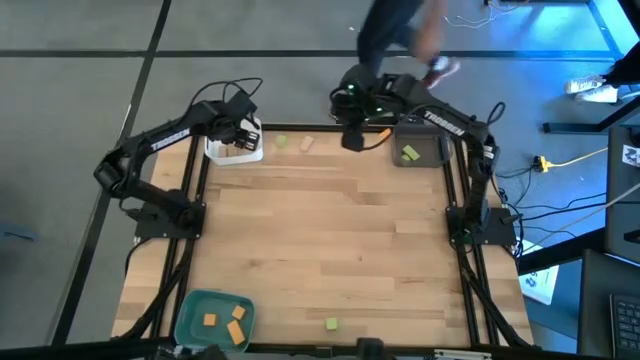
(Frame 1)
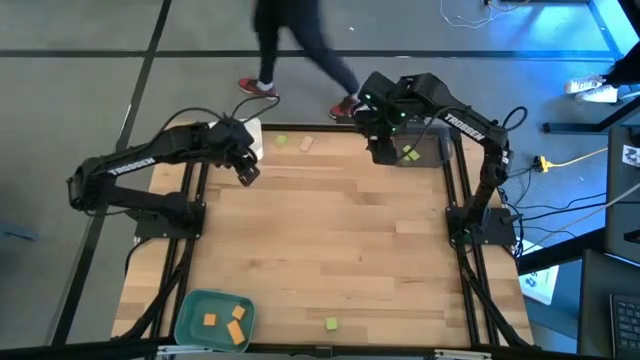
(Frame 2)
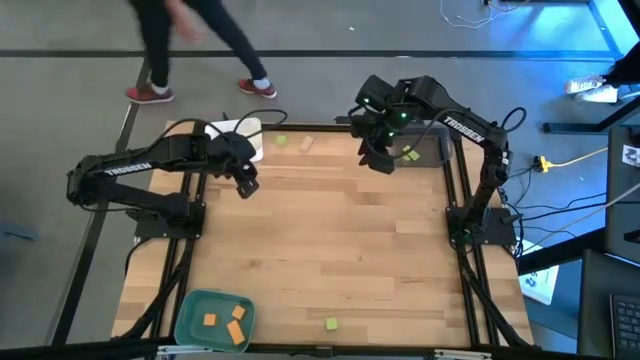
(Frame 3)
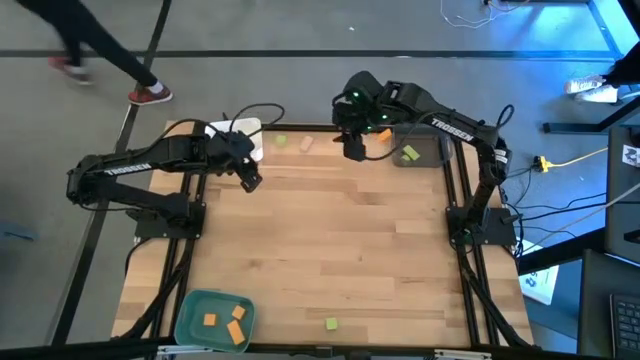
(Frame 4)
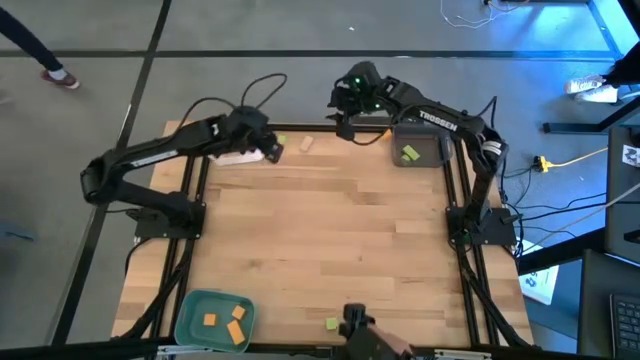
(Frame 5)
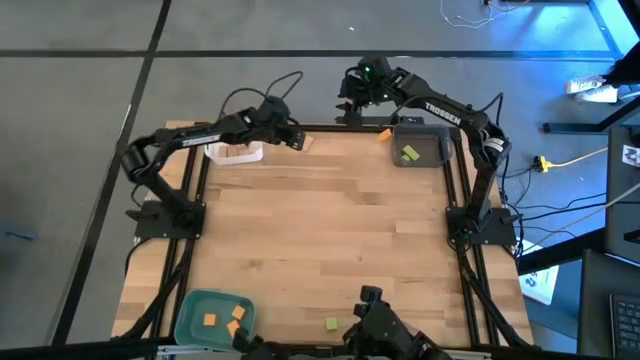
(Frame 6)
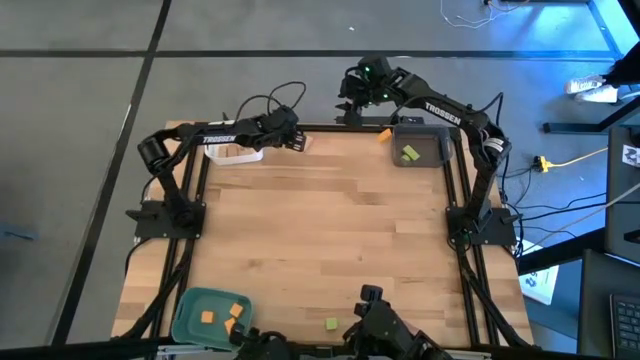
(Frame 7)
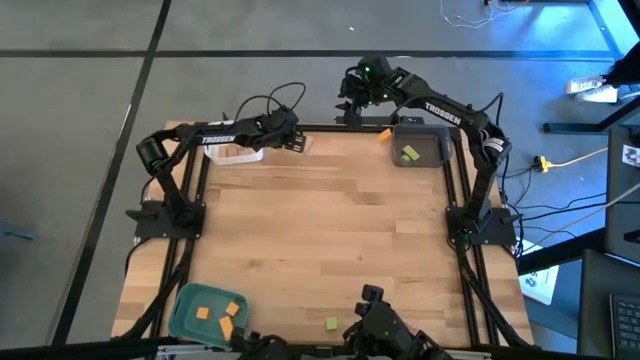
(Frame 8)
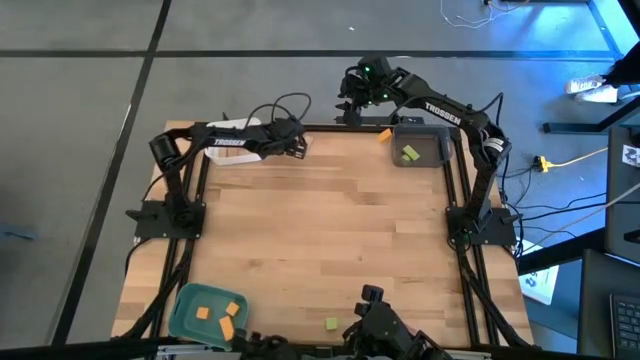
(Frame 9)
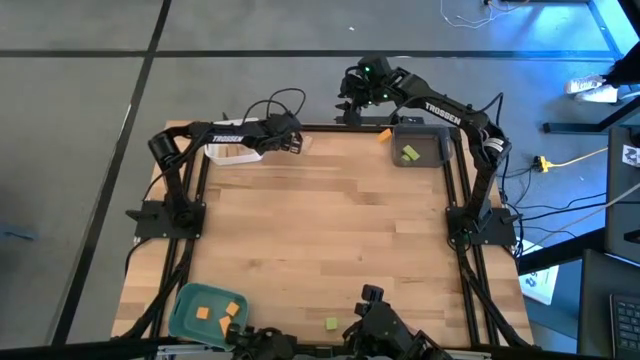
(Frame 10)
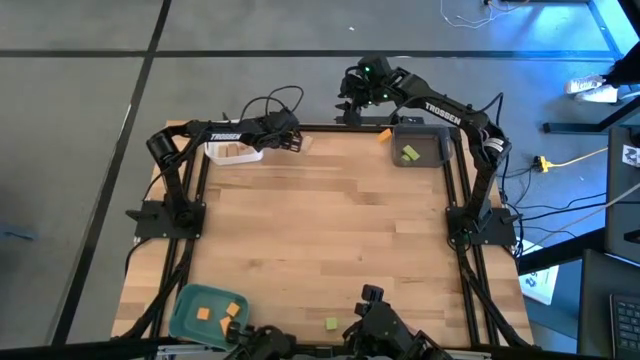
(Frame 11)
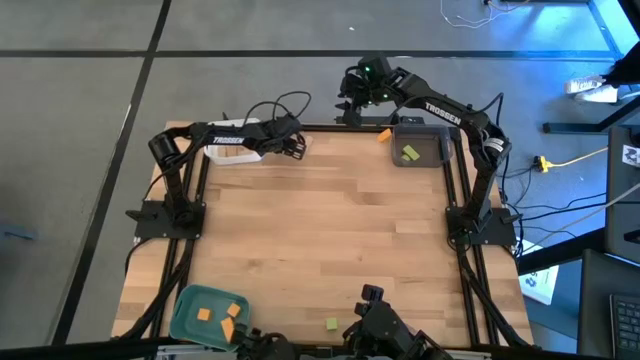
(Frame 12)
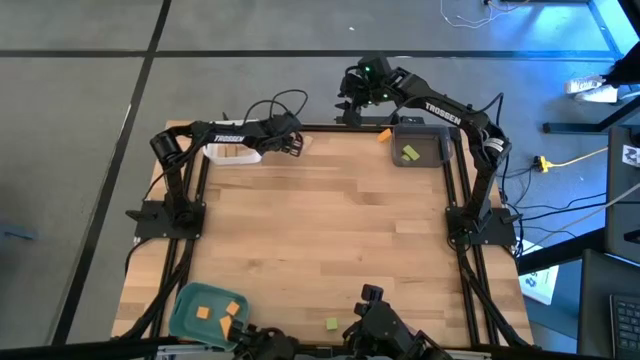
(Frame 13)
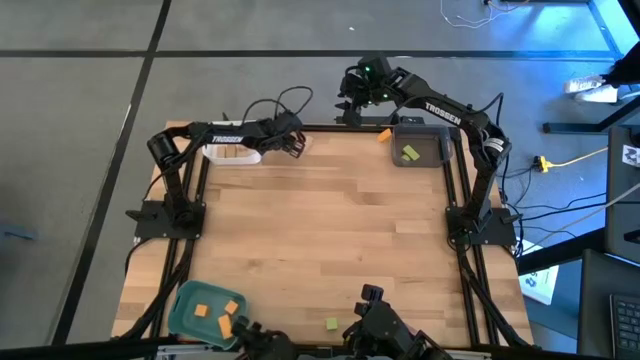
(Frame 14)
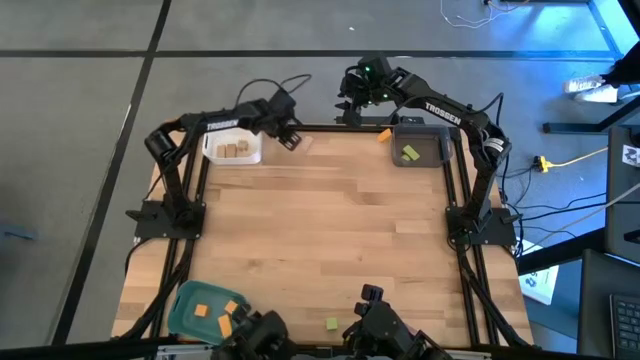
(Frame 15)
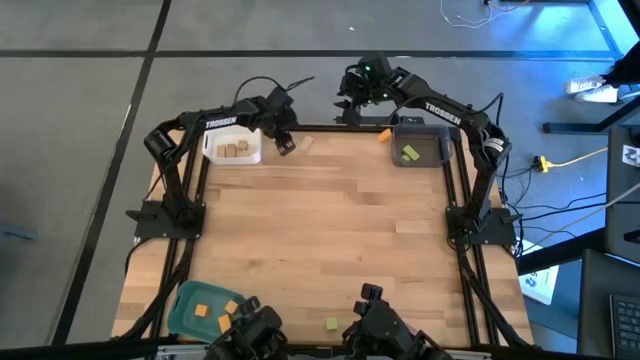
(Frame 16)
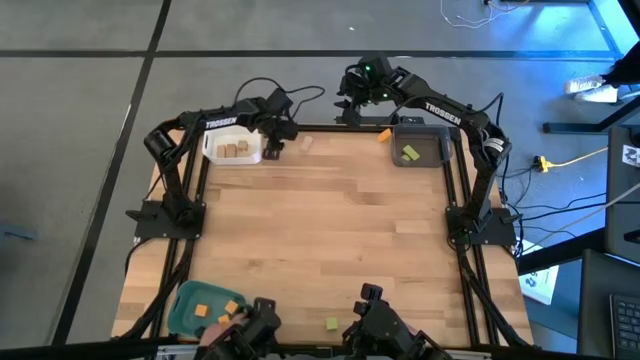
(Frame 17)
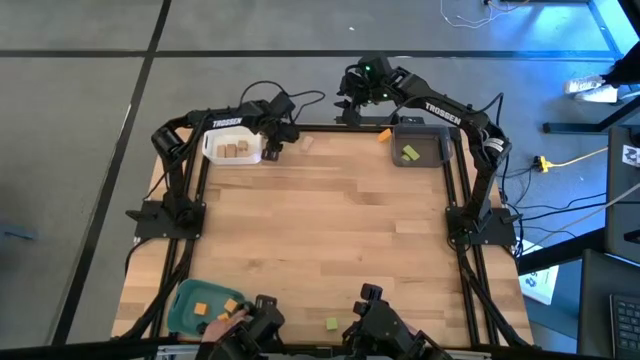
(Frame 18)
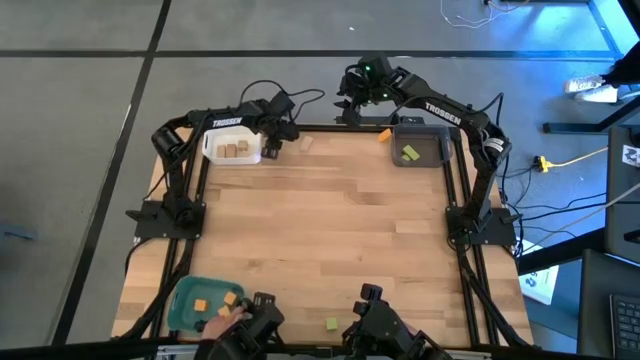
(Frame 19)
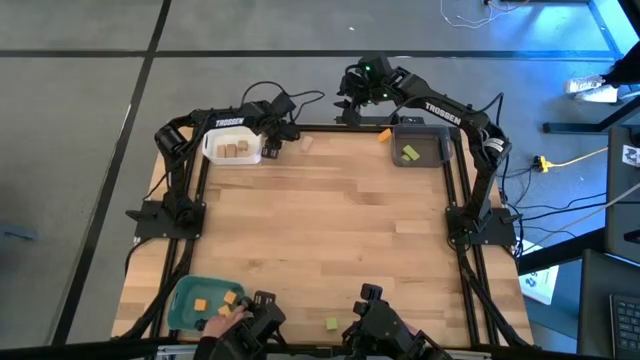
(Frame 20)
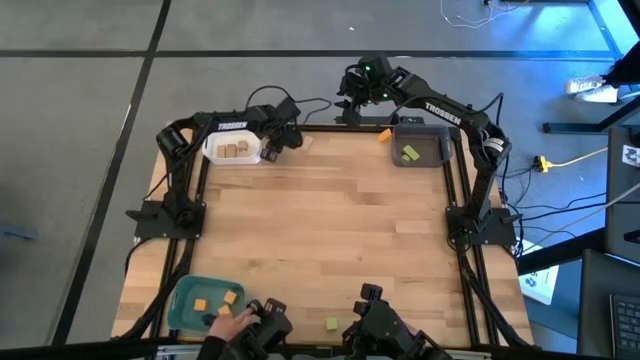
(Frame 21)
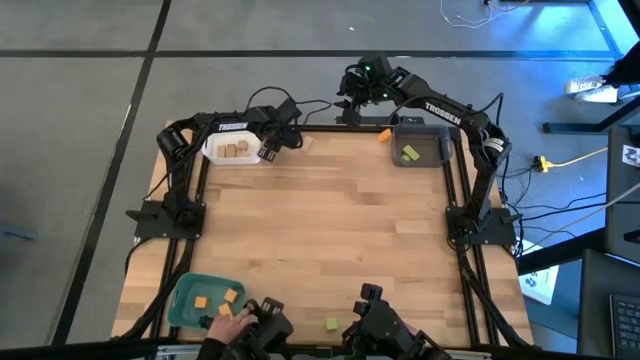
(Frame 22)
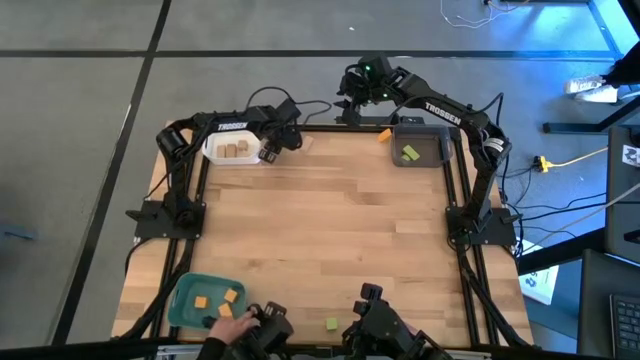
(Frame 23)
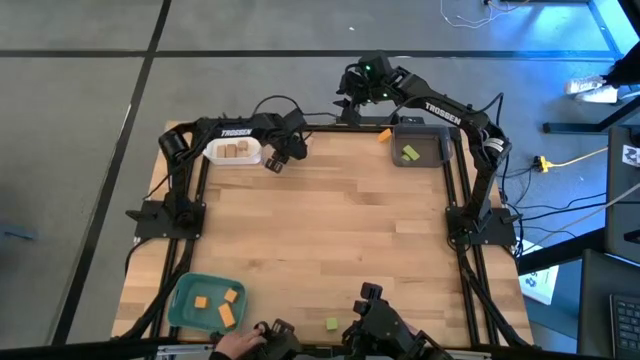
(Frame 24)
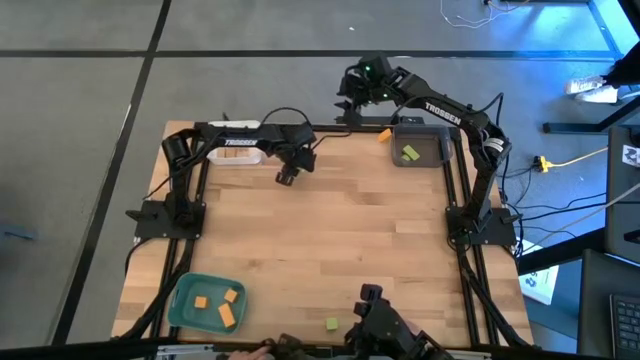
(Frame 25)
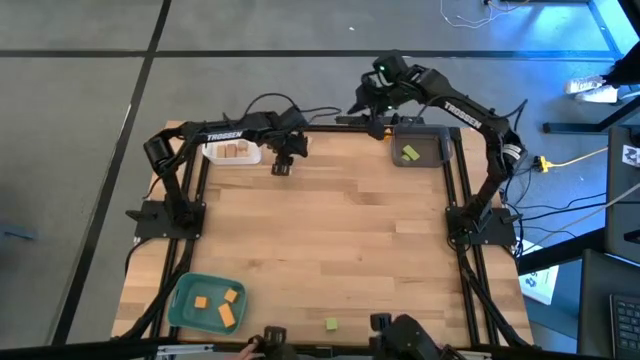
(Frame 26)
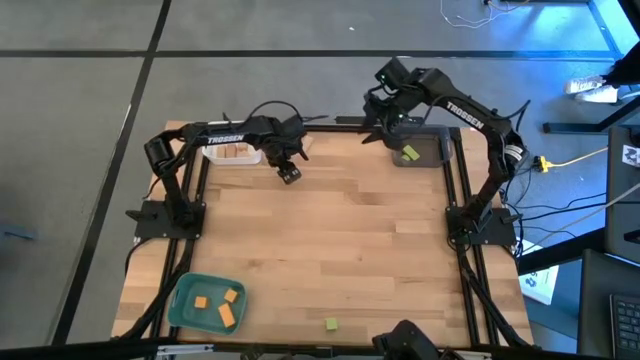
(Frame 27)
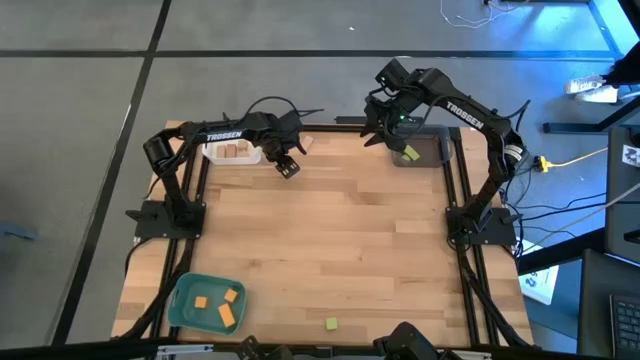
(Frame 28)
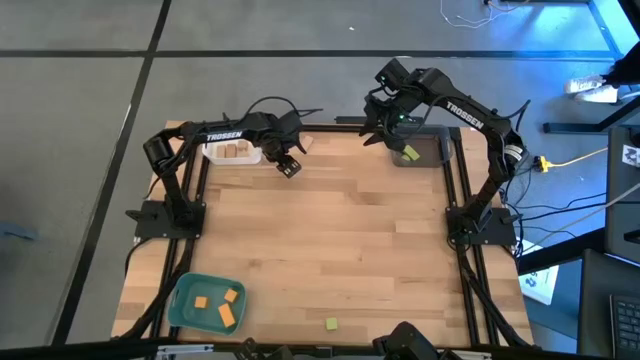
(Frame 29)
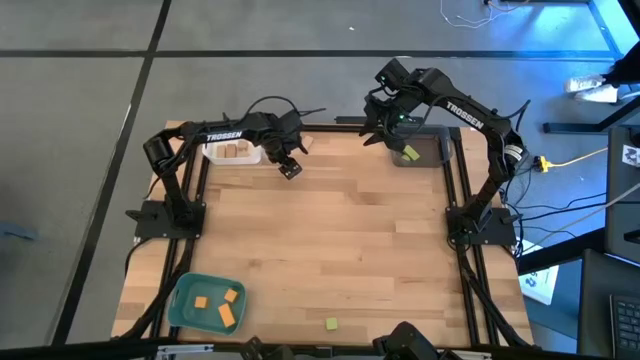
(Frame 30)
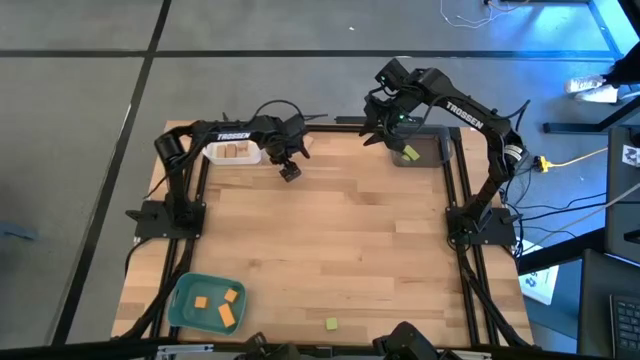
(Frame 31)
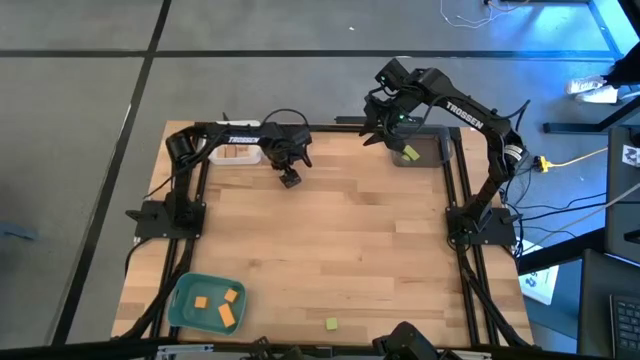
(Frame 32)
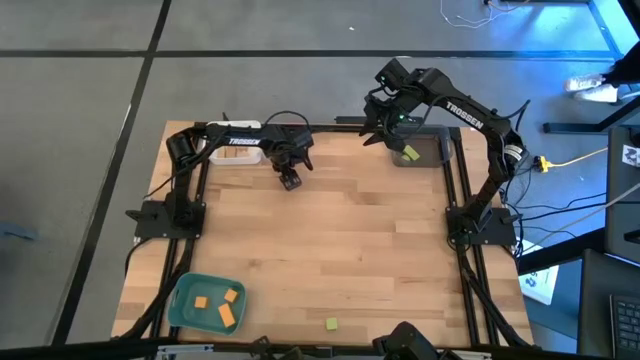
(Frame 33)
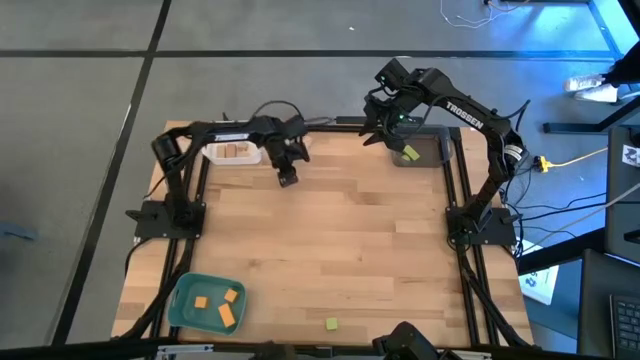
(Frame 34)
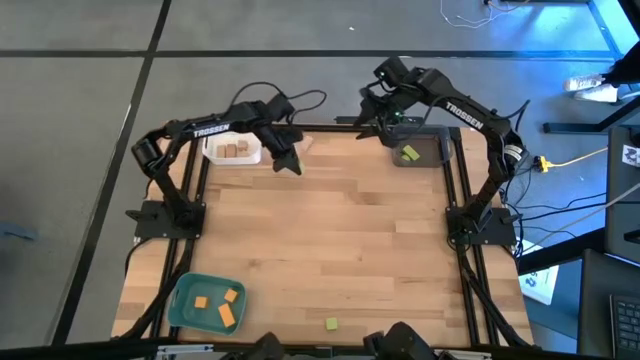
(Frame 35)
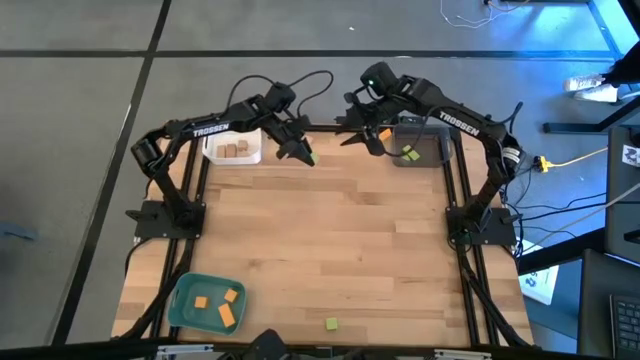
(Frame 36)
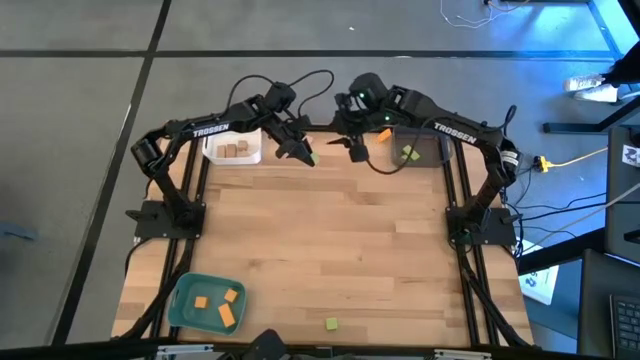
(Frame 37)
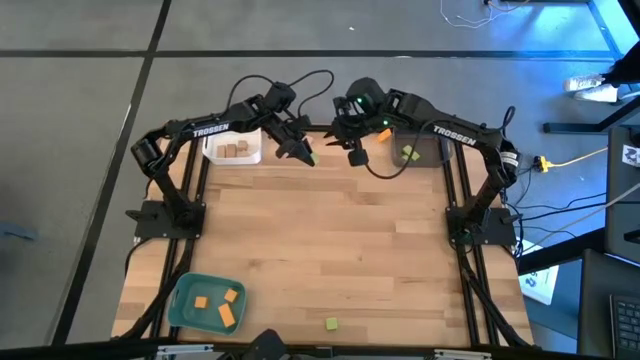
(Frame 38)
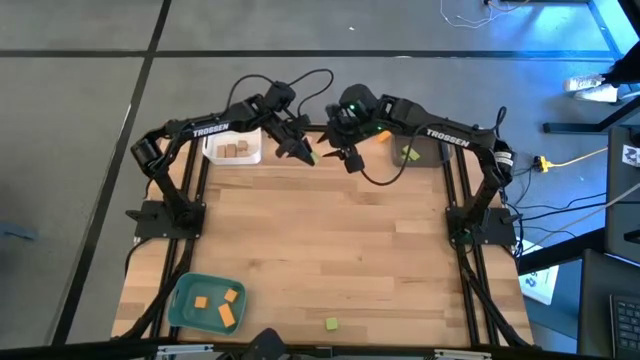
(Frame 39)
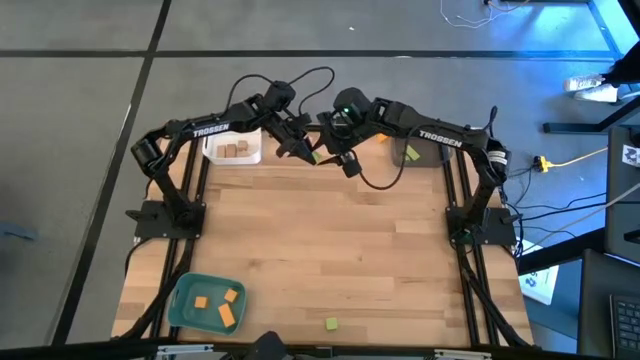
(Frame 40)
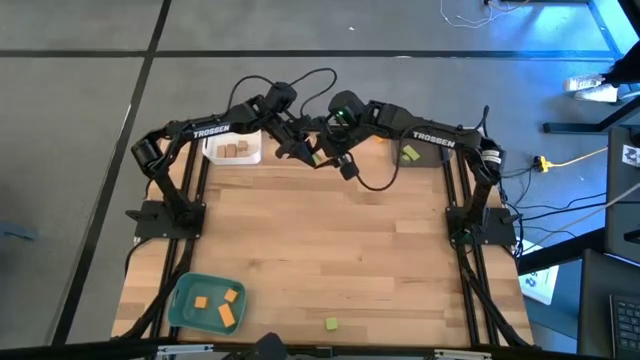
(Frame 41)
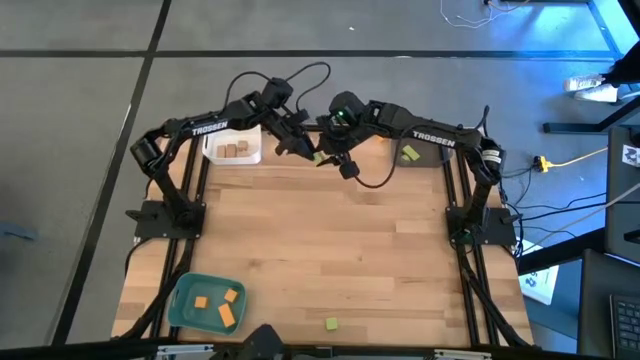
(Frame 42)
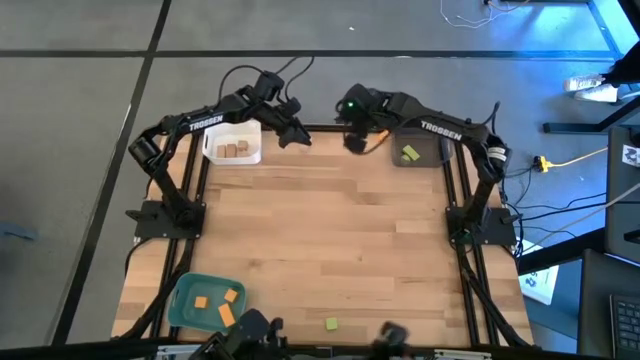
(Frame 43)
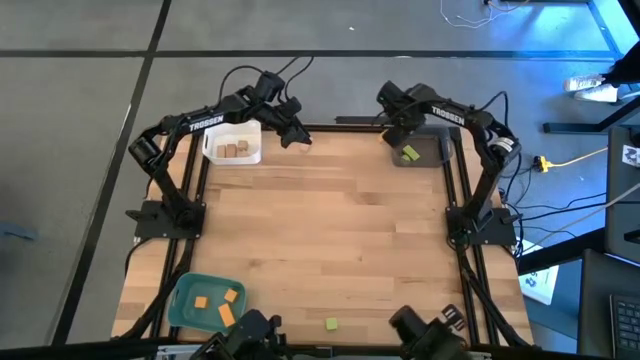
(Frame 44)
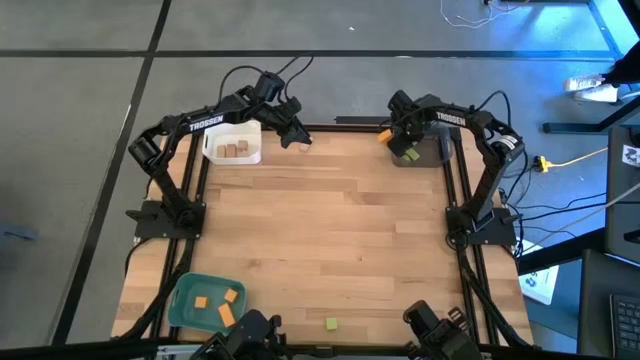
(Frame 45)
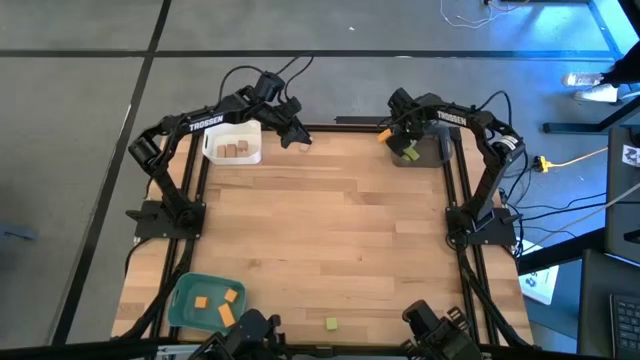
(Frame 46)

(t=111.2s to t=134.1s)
Task: Sort & place blocks by color
Put the green block into the black bin
